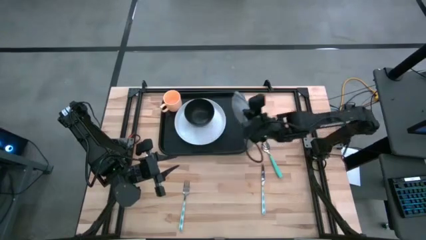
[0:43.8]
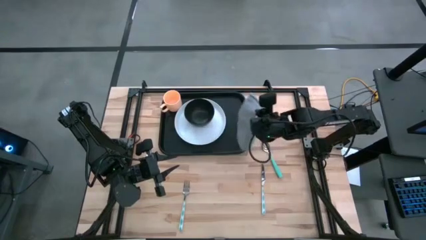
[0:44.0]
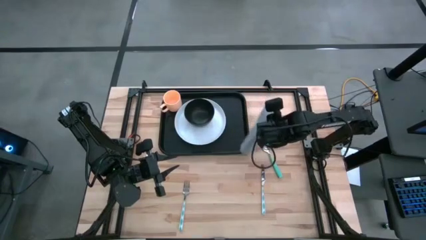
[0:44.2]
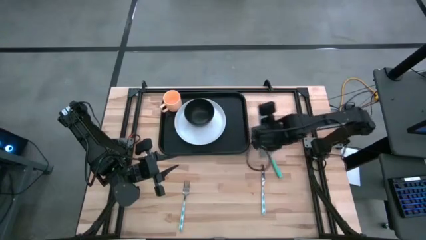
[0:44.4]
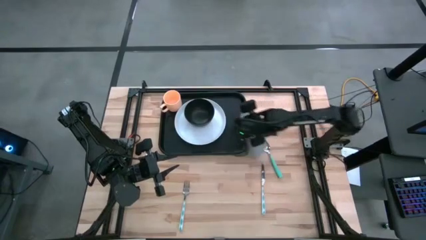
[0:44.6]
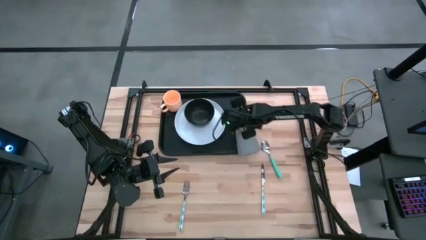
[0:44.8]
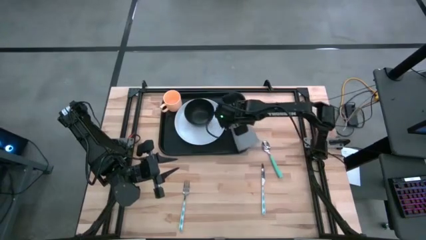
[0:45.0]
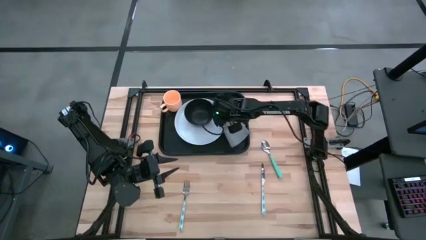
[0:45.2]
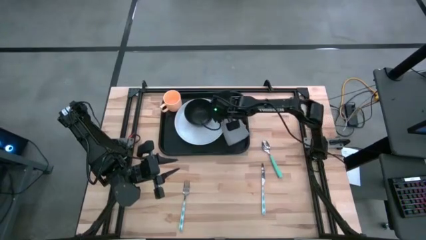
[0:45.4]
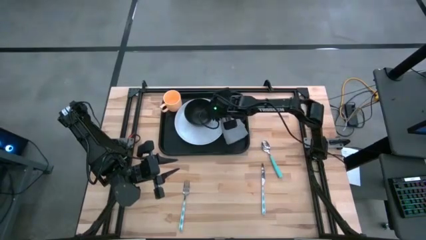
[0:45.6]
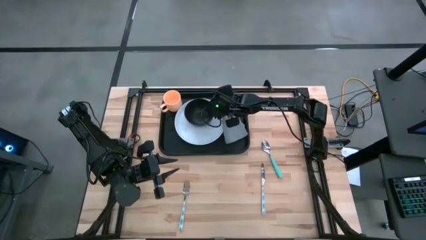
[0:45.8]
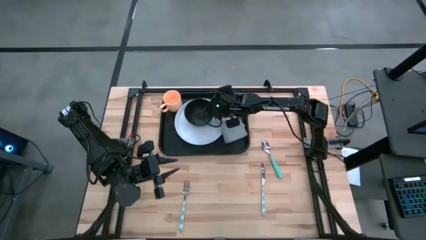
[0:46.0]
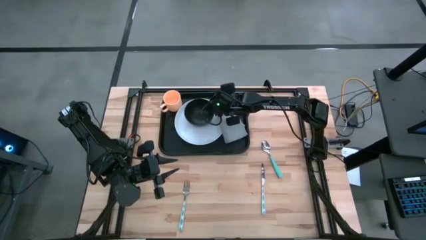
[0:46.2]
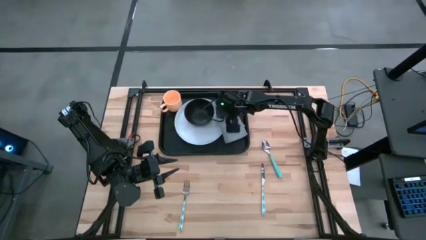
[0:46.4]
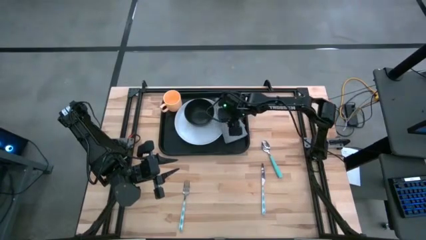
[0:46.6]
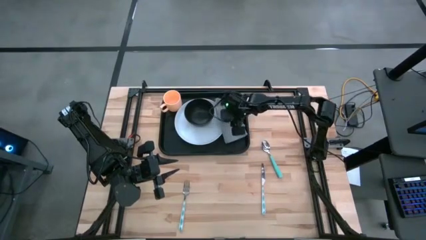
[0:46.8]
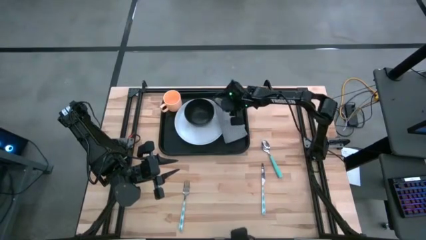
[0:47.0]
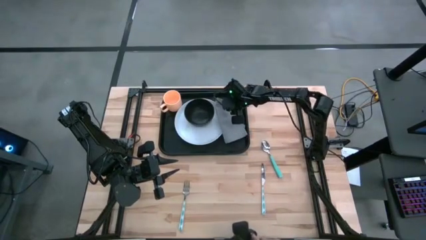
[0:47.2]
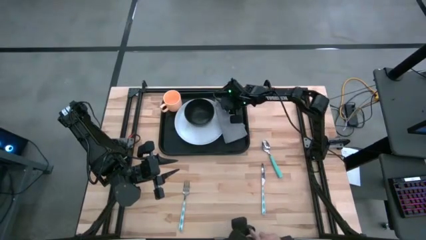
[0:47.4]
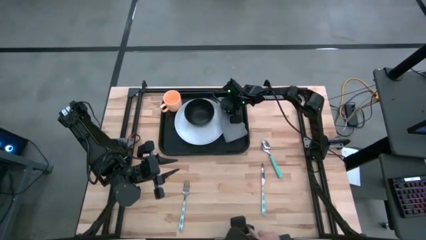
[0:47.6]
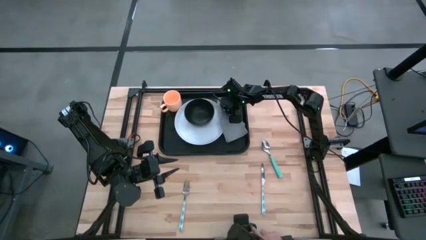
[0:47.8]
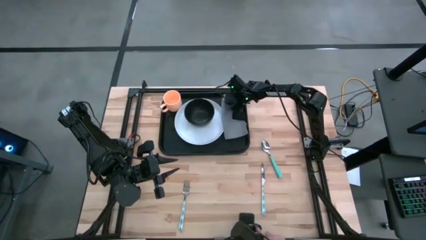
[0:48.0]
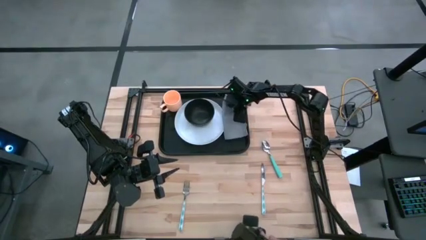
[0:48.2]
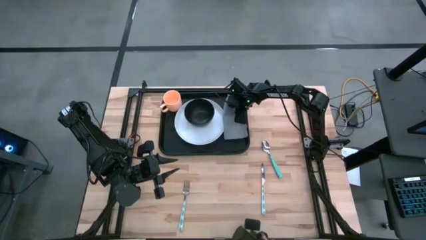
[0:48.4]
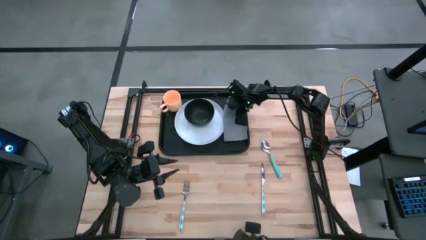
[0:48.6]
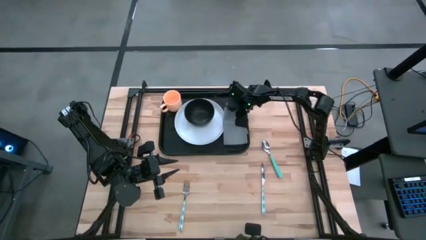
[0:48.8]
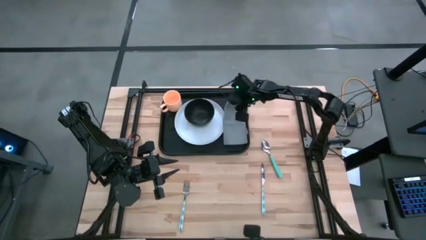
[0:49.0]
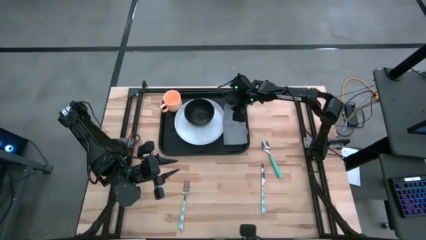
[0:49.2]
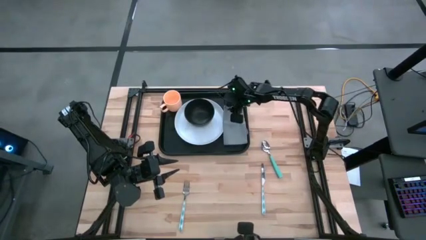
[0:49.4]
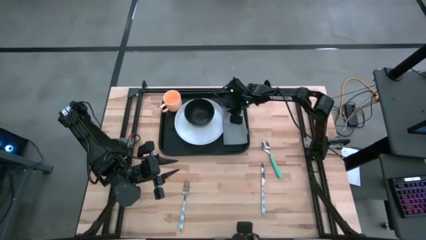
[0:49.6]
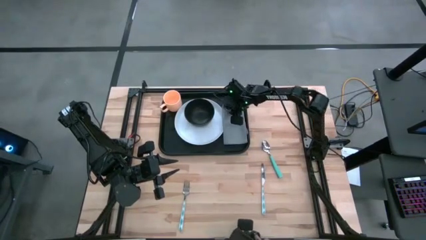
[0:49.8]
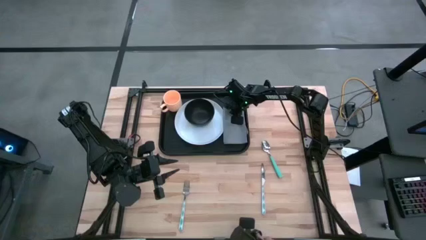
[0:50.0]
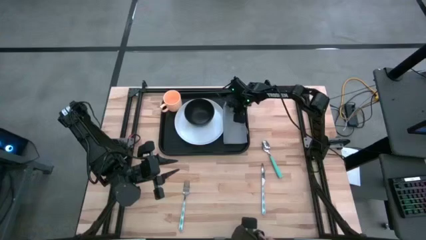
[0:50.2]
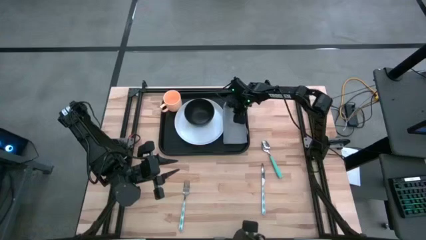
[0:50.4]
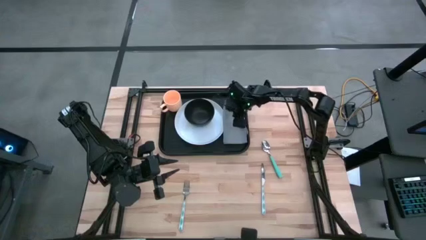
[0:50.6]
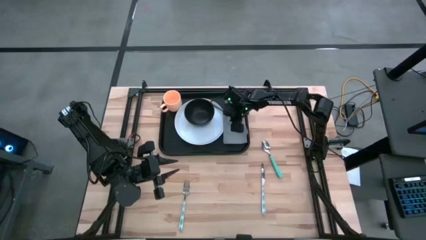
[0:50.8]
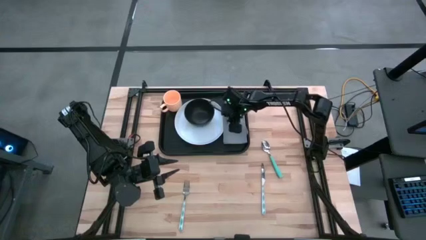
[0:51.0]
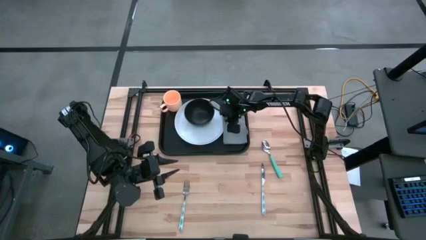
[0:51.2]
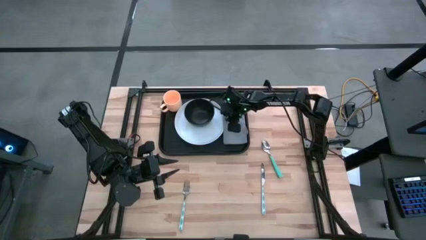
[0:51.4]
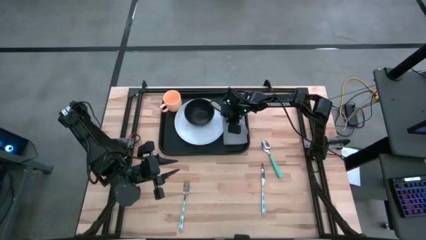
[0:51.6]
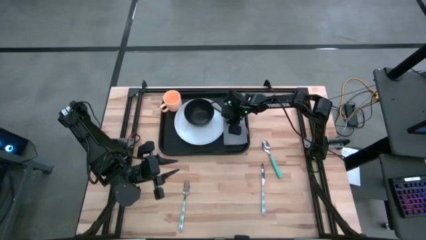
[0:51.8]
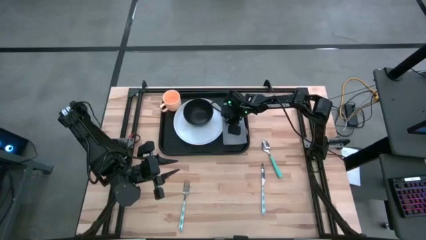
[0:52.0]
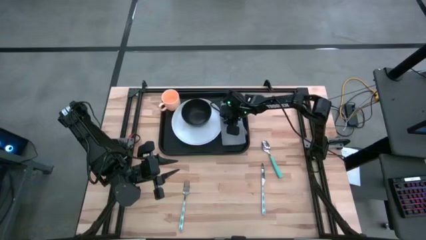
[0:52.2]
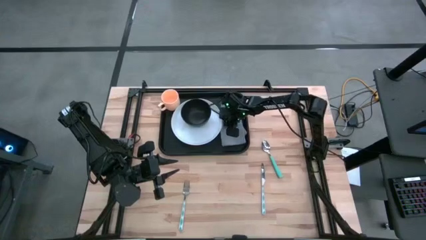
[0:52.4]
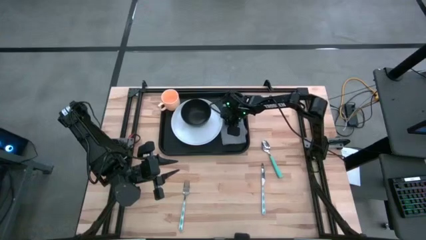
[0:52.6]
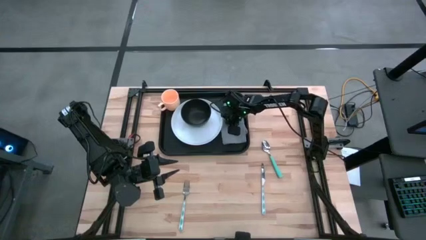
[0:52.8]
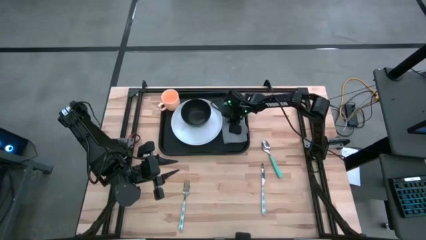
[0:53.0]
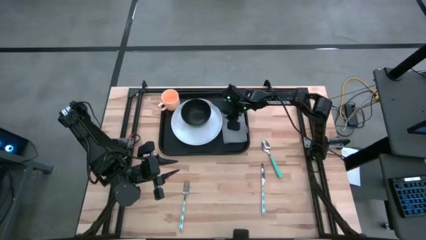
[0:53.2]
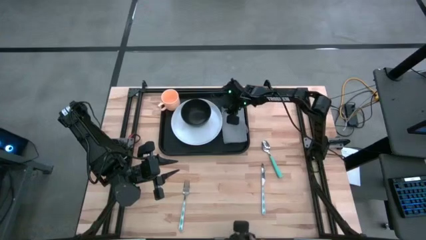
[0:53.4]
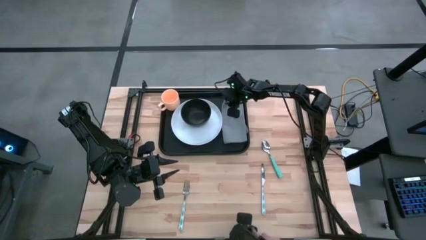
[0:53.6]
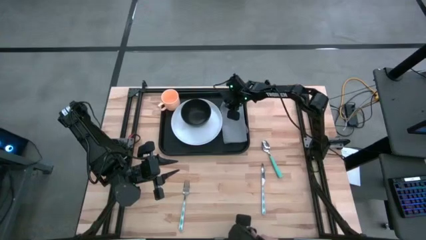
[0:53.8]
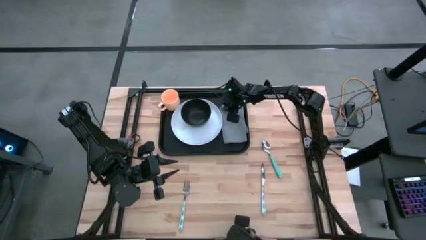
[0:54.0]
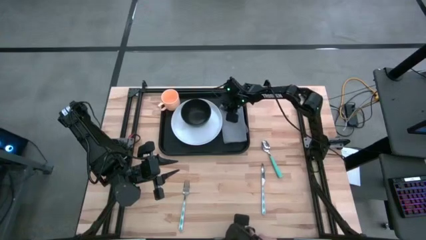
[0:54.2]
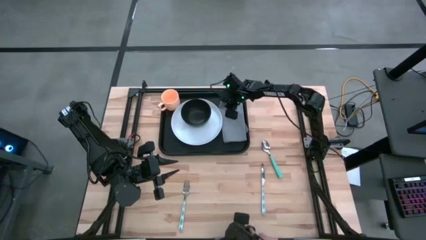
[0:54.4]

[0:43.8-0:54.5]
Task: Set up tray
Put the napkin to the right of the plate on the serving tray

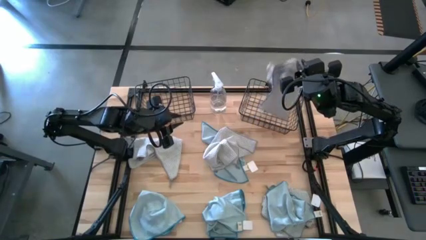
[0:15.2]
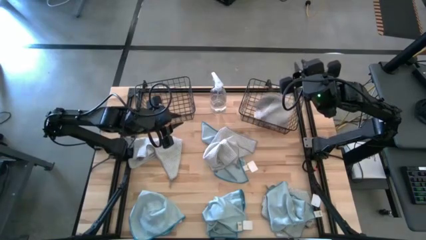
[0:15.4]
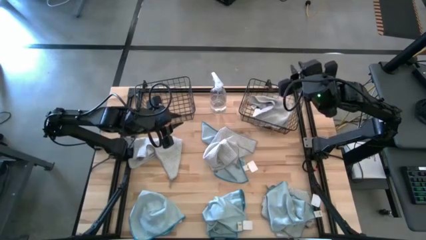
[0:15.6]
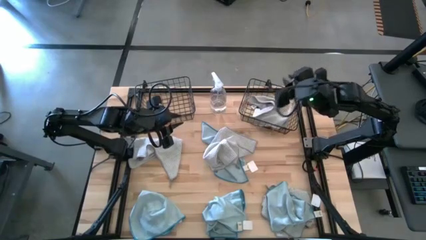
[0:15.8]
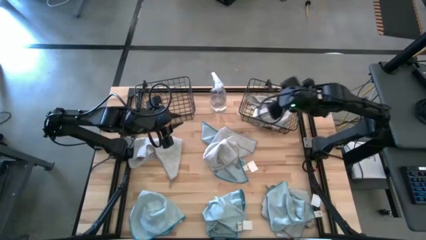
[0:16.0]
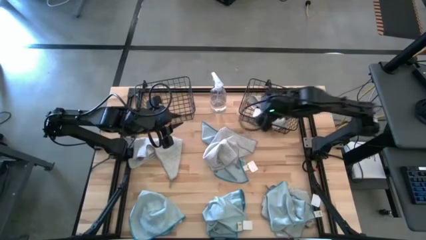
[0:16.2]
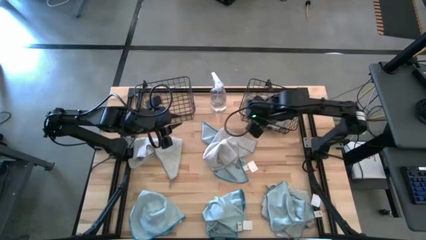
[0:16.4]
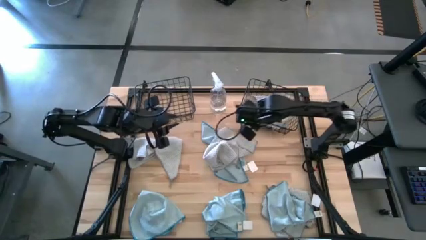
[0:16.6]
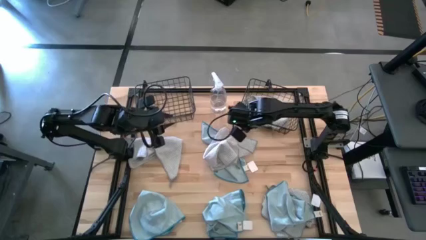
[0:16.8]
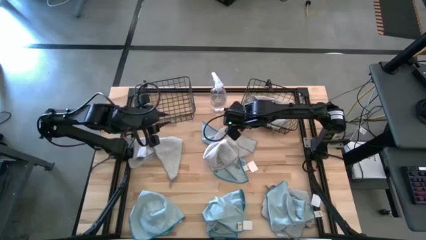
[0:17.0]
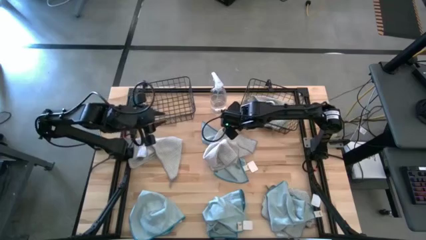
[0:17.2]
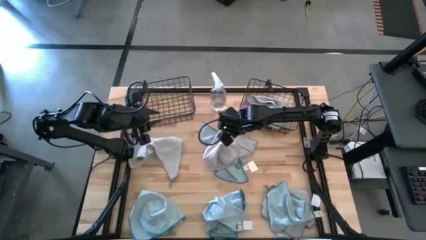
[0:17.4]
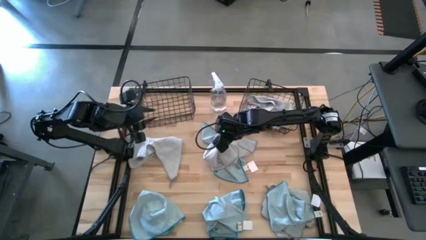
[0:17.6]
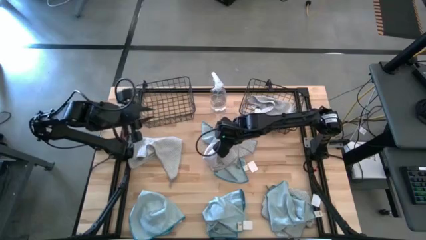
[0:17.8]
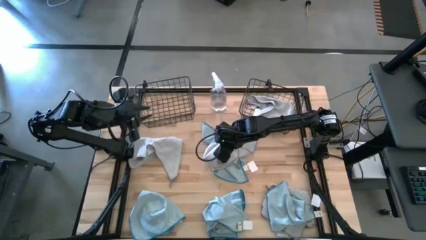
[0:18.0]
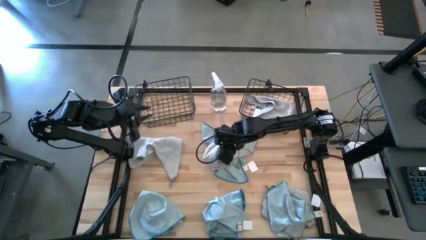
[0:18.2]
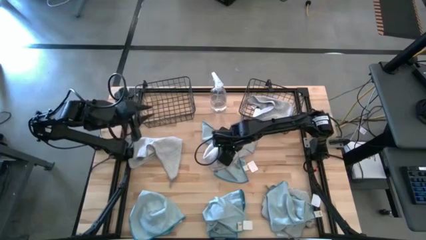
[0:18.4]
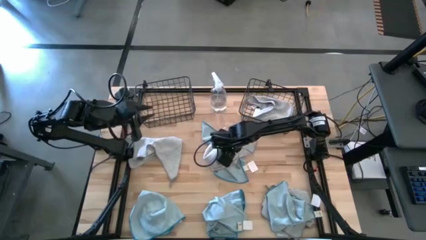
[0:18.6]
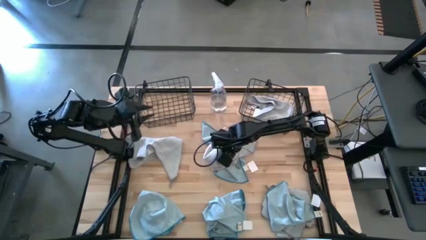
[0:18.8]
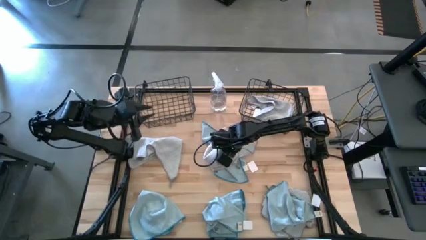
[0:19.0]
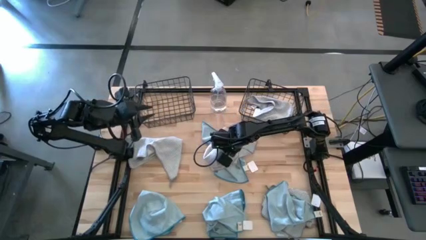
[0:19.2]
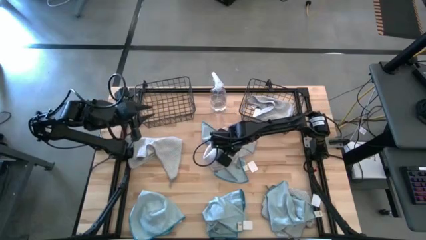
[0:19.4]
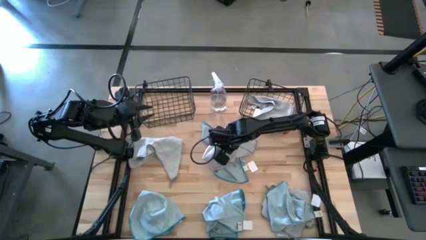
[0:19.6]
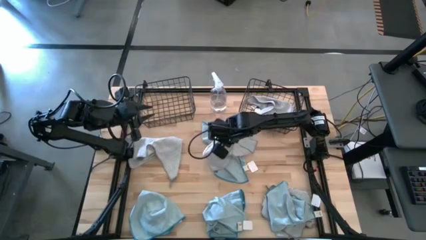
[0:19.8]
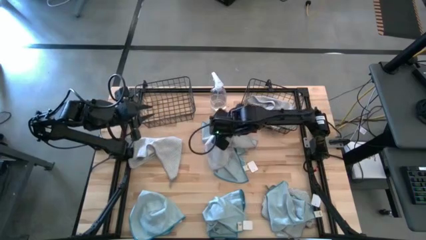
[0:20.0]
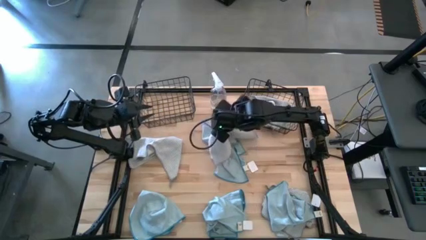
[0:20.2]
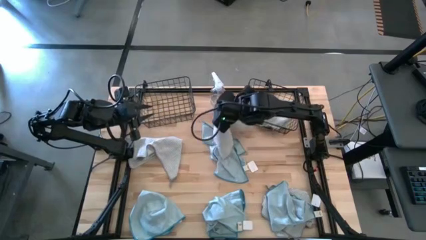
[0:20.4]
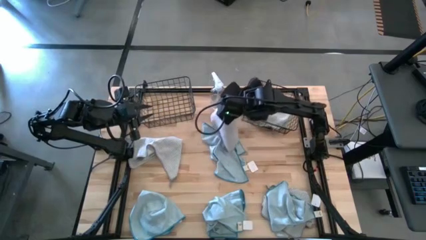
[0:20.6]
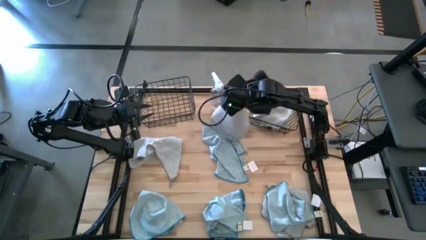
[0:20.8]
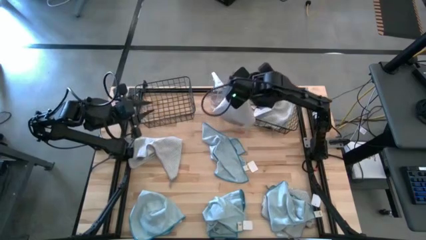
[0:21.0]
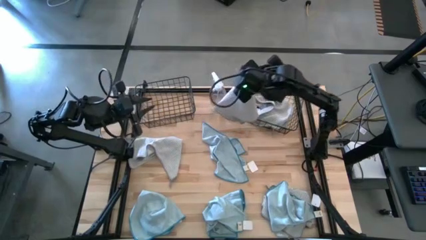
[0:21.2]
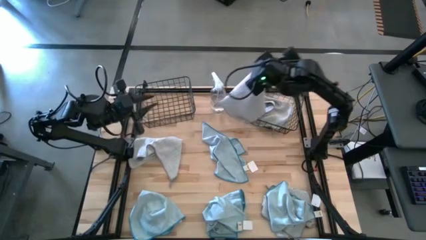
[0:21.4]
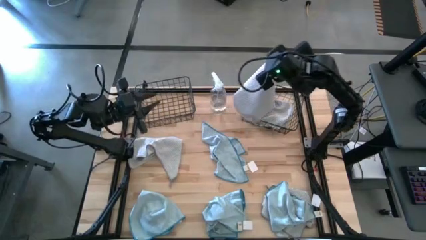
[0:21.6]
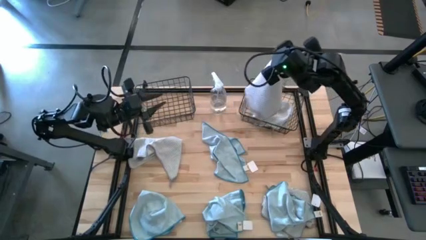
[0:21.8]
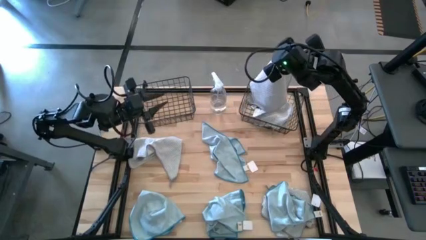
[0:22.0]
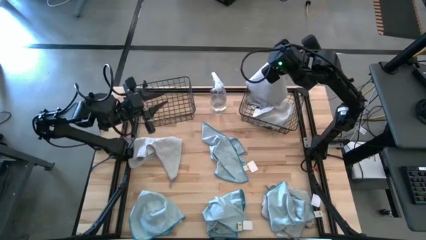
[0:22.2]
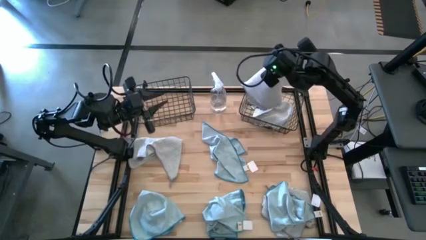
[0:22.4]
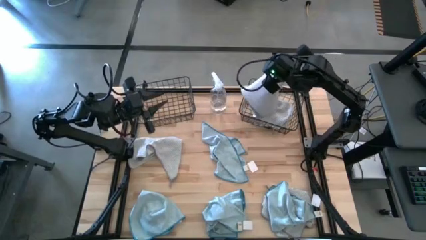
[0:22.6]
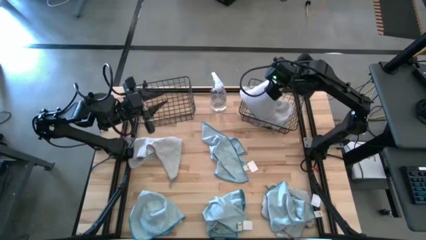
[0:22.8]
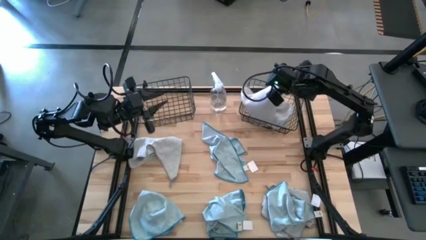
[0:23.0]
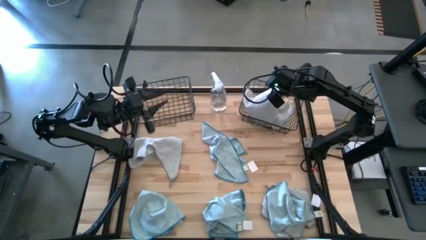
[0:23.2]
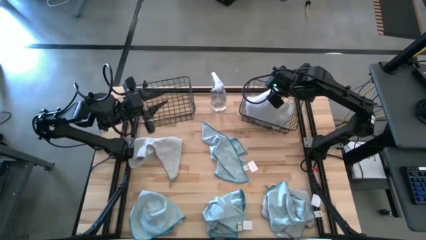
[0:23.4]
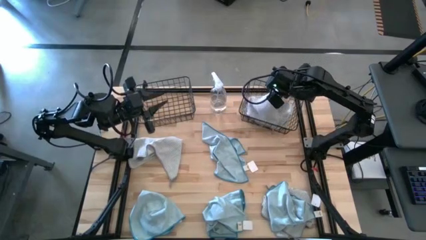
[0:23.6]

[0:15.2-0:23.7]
Task: Sort microfiber towel by color & place in baskets
Put the gray microfiber towel into the right black wire basket
